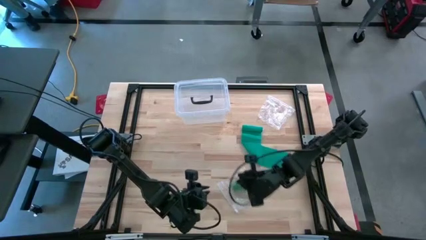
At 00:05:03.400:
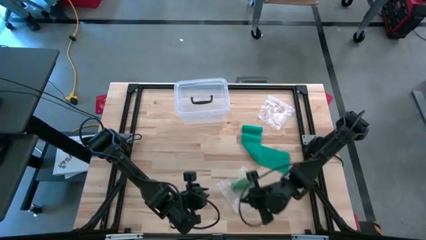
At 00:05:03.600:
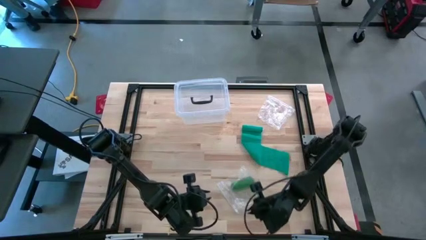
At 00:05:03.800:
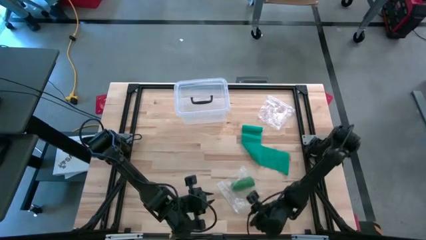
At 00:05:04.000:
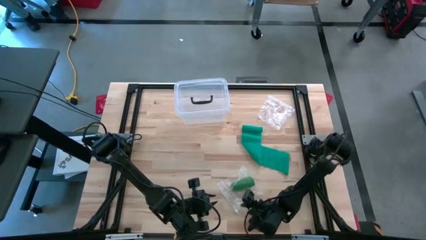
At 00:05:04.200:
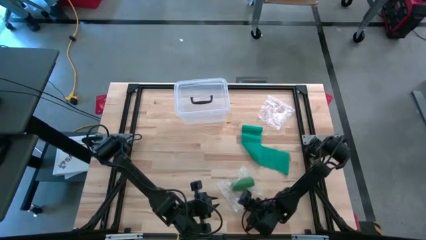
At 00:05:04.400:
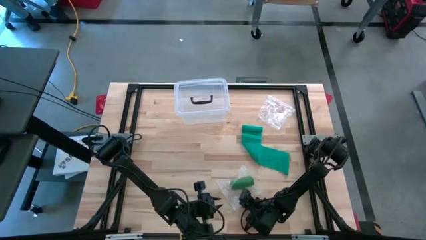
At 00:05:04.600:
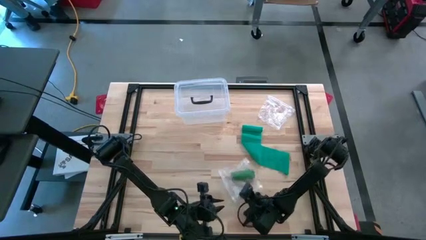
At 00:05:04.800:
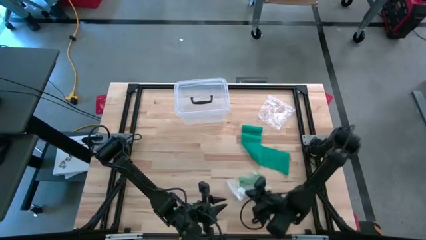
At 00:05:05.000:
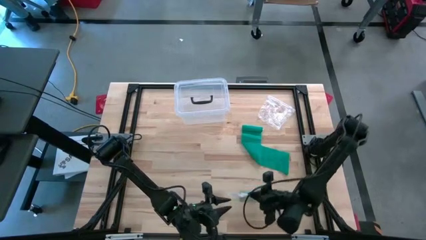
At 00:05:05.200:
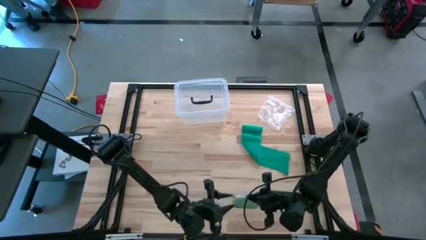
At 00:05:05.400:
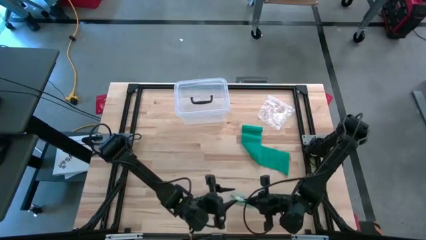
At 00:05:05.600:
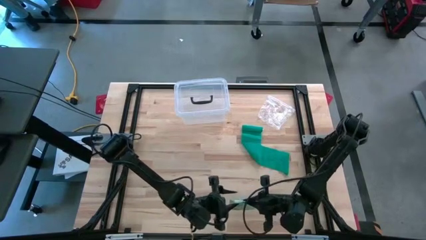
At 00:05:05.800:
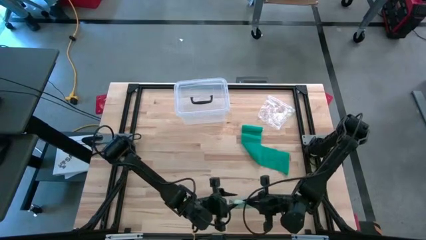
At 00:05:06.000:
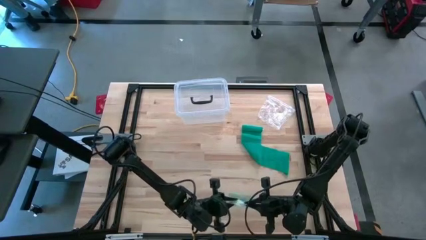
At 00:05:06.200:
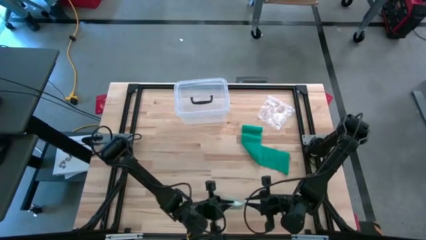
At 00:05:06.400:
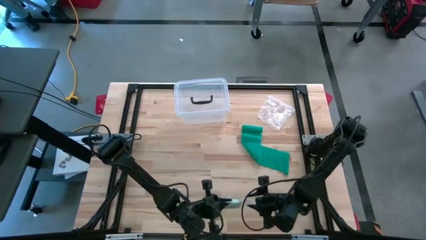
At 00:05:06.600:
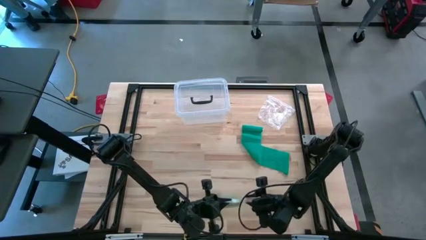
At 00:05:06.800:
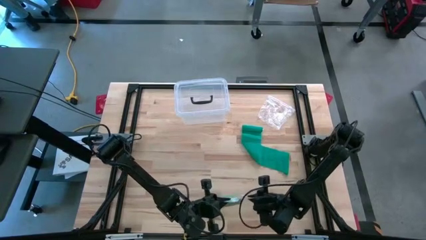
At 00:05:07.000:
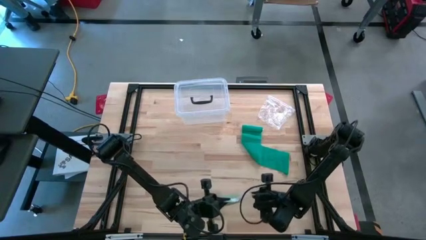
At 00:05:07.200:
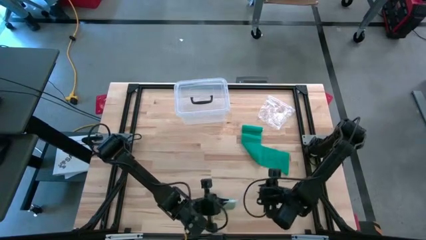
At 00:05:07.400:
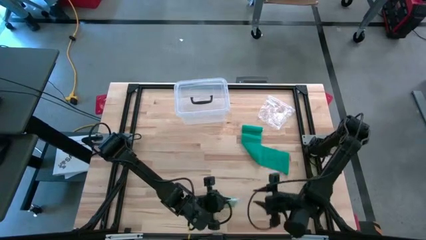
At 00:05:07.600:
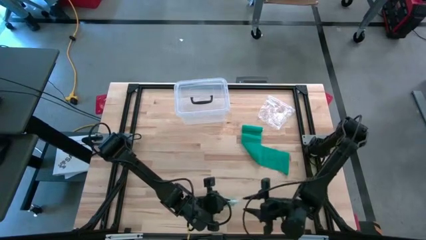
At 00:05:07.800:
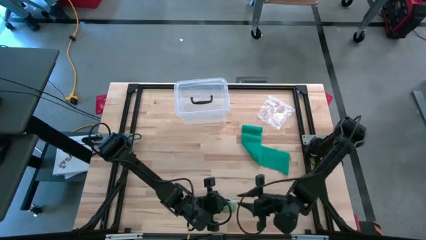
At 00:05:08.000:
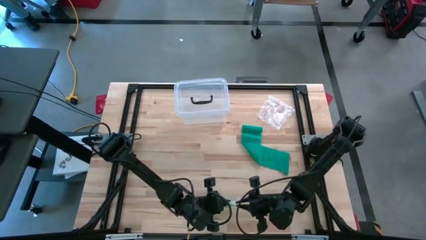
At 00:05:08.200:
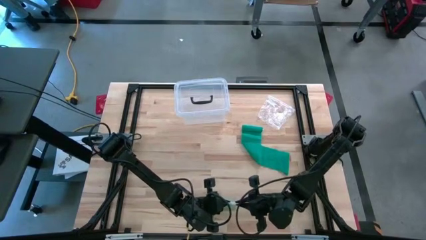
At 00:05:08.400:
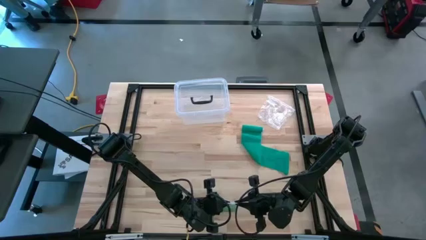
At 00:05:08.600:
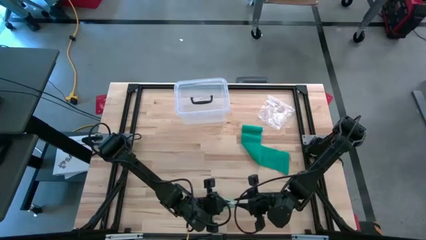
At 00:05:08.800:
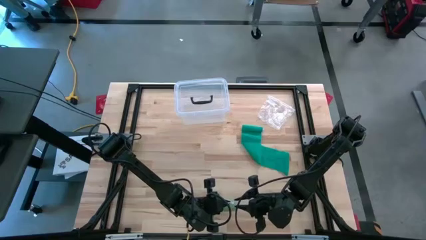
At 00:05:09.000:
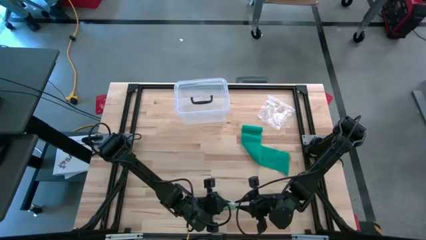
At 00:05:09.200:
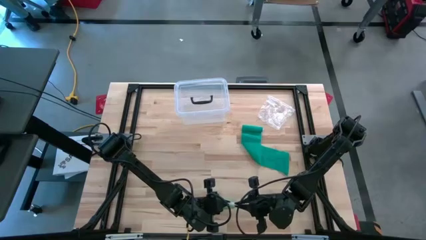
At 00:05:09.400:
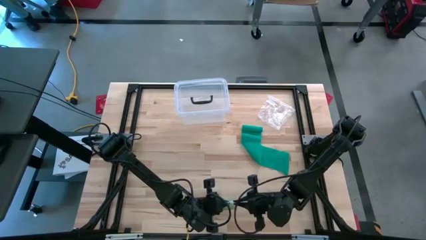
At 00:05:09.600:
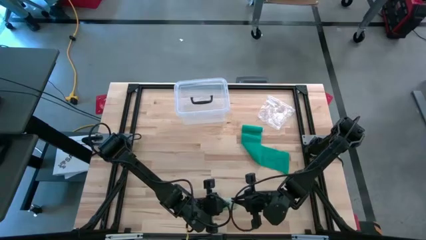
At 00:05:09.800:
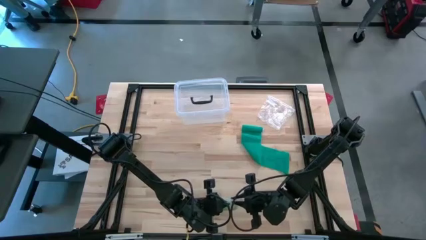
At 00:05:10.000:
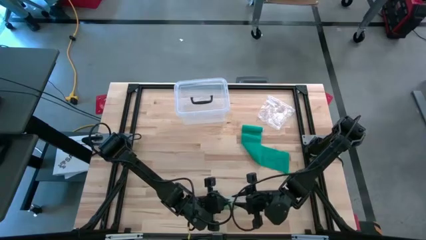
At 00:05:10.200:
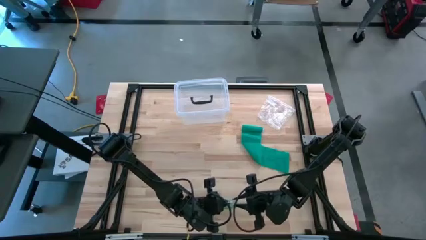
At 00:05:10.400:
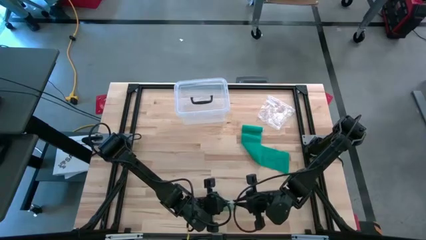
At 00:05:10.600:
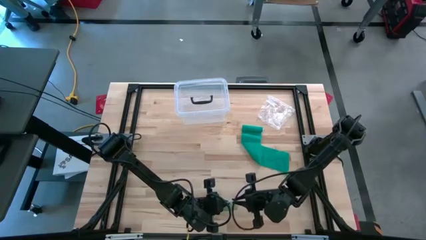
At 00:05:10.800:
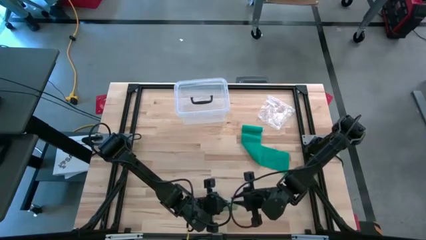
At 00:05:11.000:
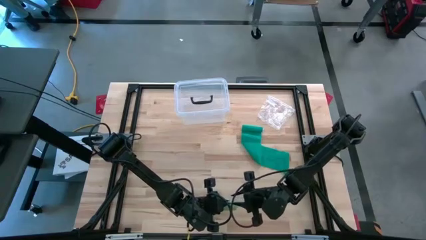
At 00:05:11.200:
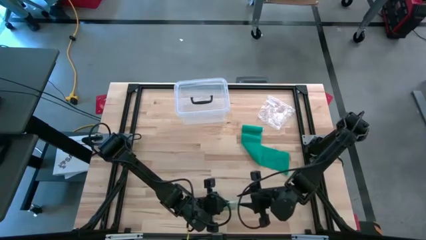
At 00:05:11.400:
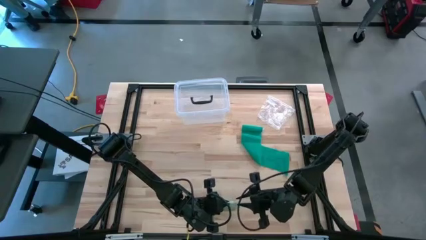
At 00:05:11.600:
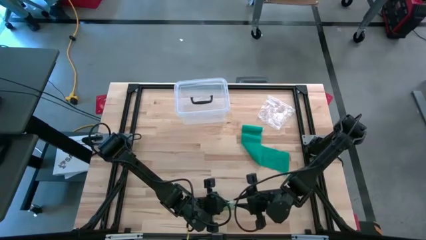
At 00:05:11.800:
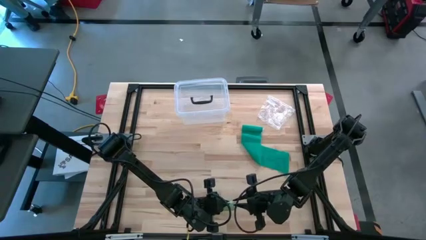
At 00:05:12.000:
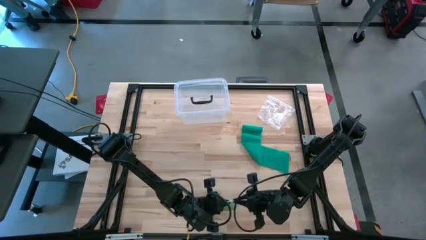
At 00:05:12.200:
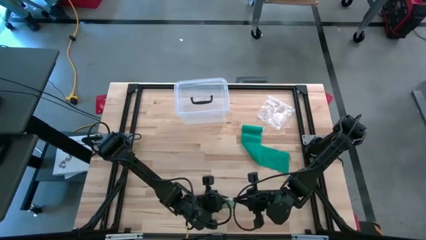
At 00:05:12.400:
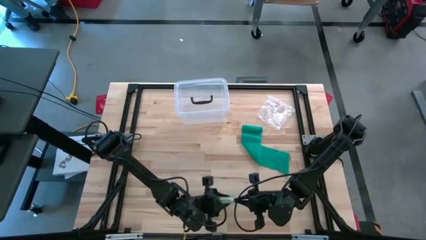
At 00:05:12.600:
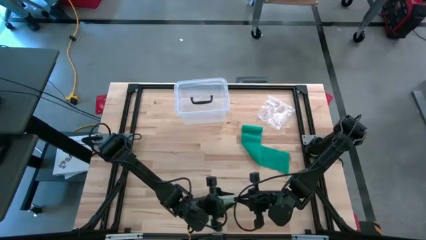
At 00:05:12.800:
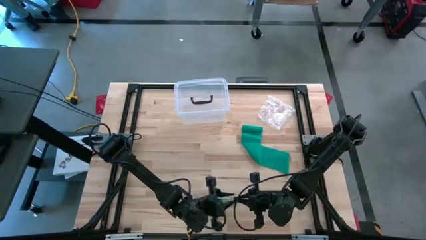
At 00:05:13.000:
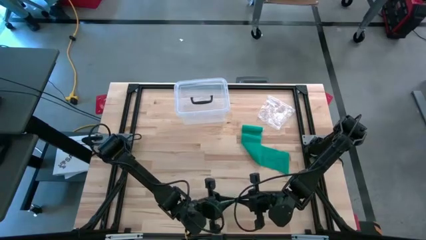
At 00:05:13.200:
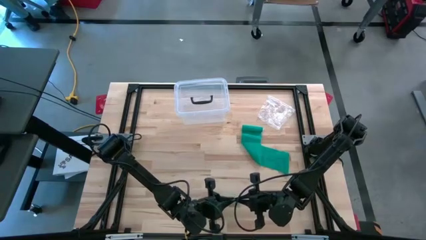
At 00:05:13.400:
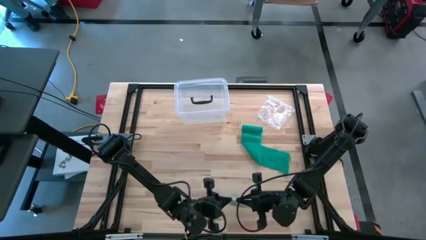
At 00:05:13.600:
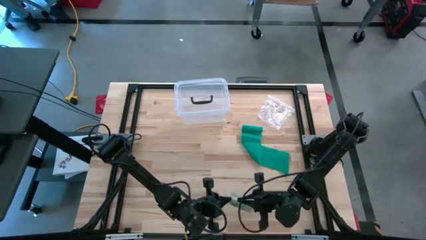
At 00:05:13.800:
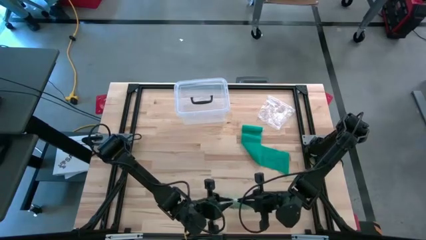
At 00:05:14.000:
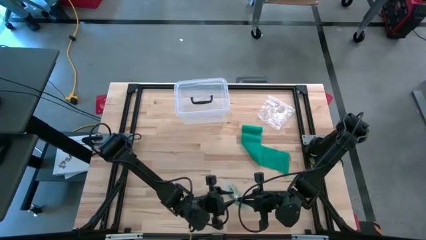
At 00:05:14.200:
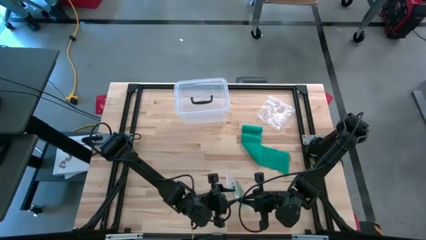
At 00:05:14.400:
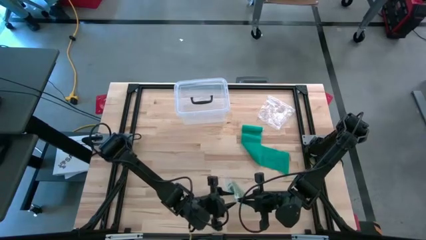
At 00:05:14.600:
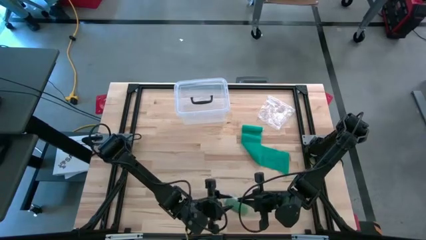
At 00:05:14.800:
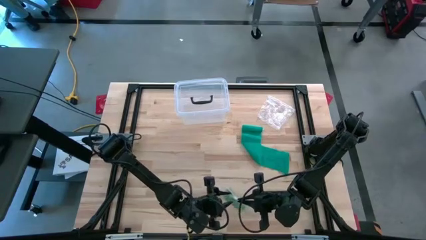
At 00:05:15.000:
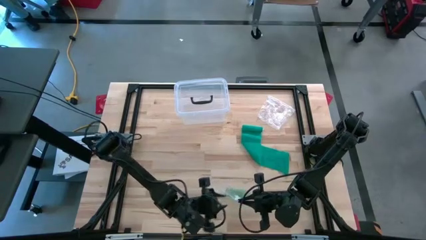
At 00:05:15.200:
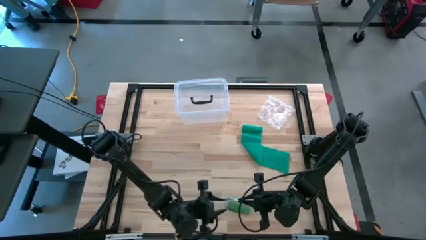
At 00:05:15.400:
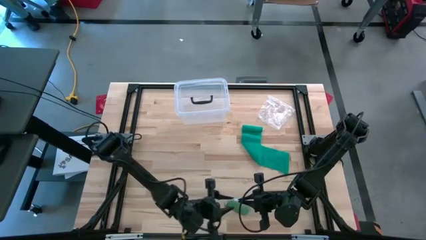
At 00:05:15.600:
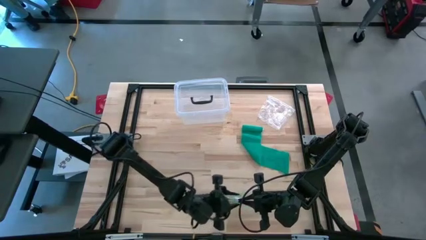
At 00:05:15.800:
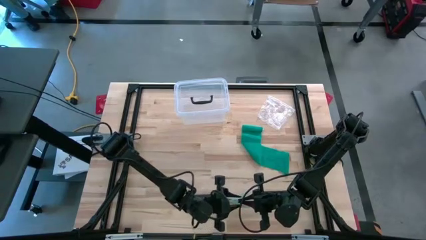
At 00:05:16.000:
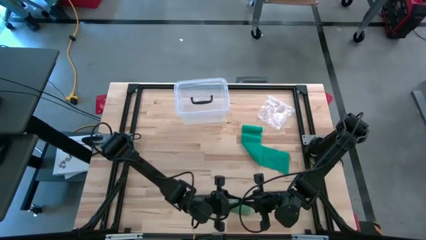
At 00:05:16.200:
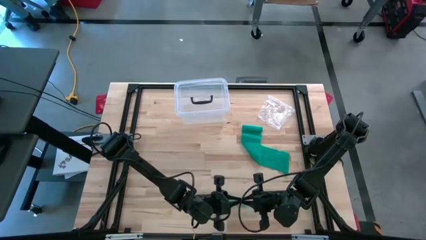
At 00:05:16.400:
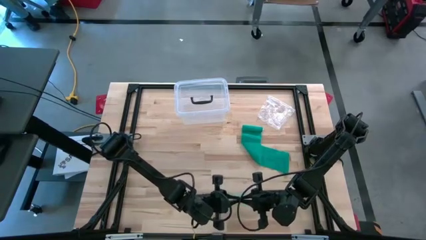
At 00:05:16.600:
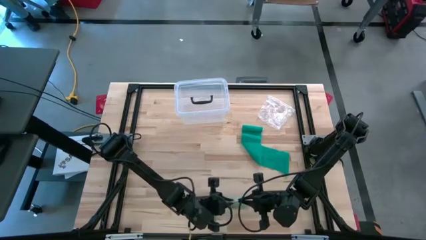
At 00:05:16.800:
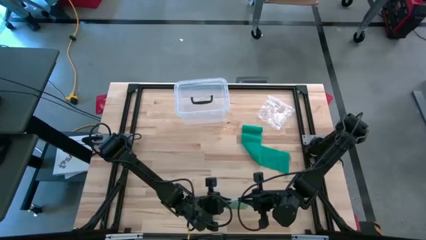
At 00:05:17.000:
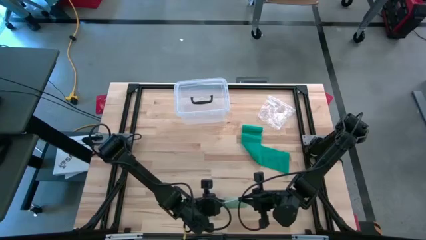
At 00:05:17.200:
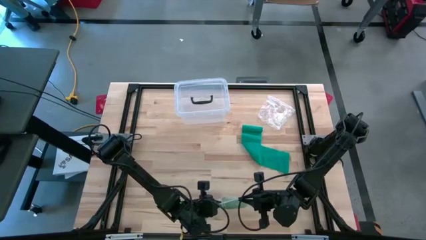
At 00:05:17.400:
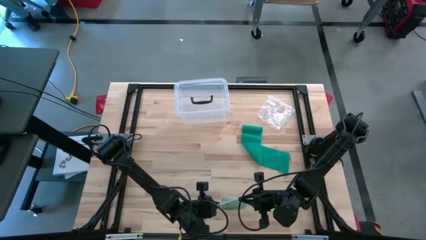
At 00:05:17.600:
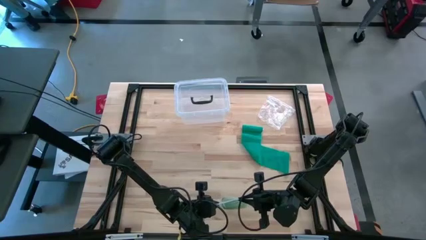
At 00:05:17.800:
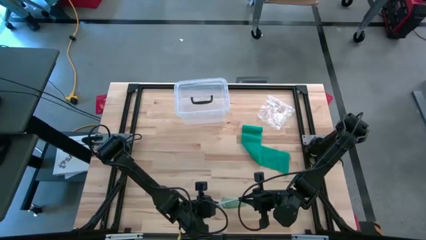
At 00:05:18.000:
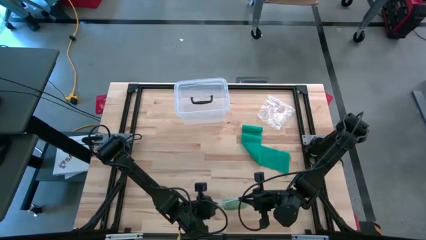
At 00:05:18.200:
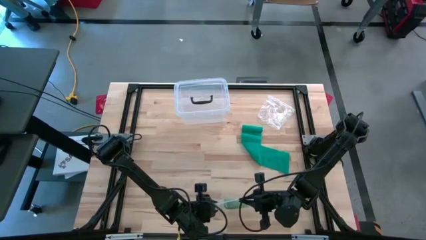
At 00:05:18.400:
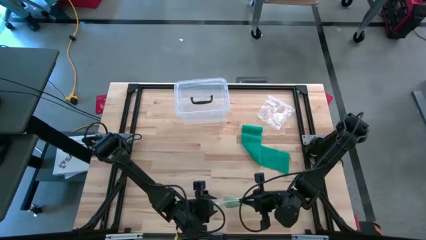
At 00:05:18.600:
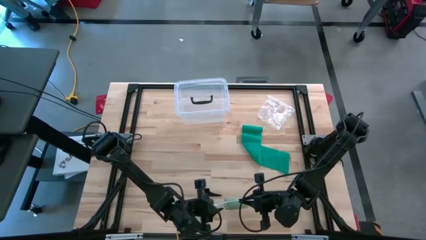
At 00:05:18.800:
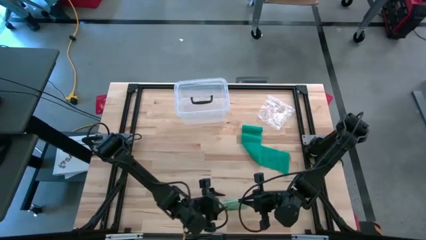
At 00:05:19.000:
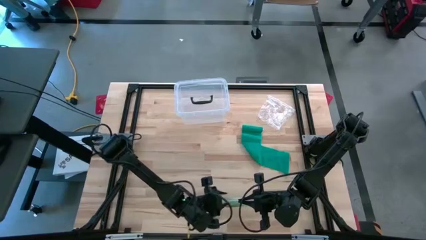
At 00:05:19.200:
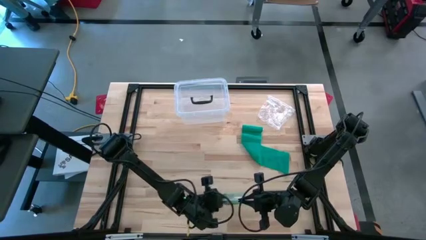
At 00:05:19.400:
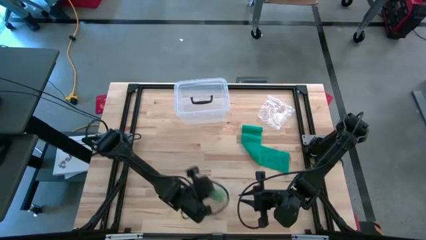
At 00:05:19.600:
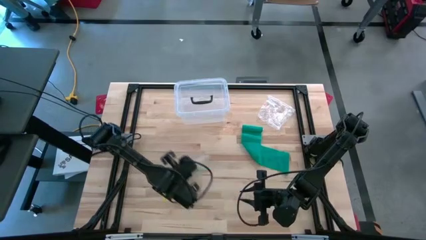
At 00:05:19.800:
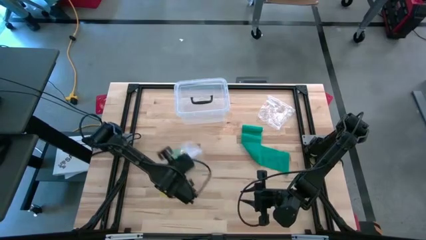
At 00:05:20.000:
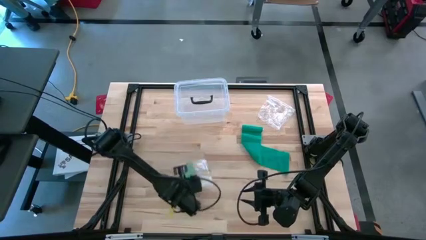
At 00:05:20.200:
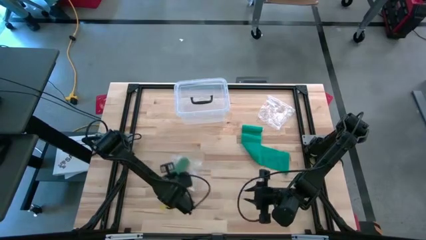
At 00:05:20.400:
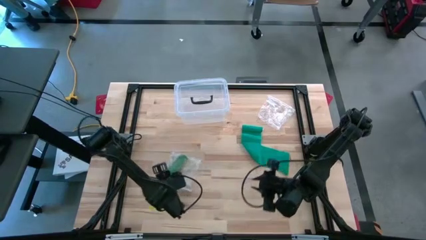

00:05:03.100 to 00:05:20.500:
Task: Roll bandage
Close the zip bag
